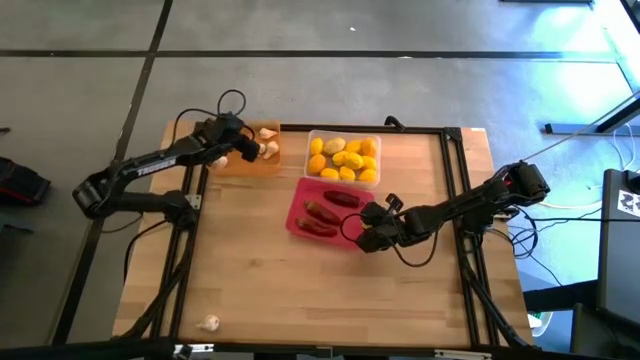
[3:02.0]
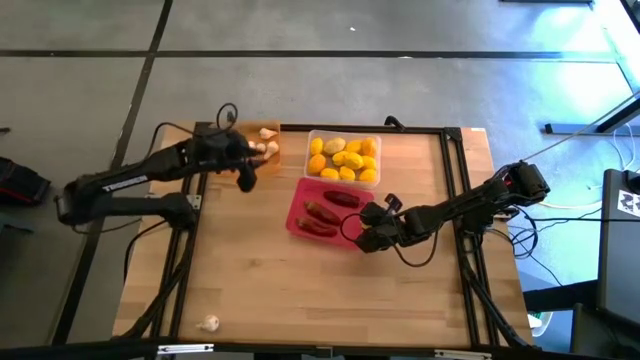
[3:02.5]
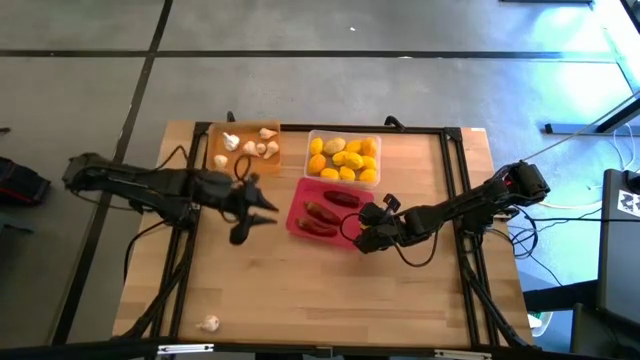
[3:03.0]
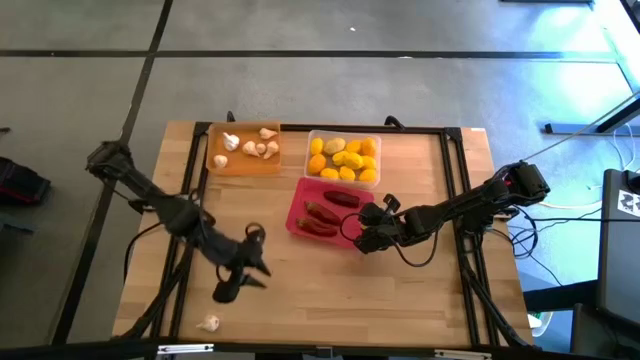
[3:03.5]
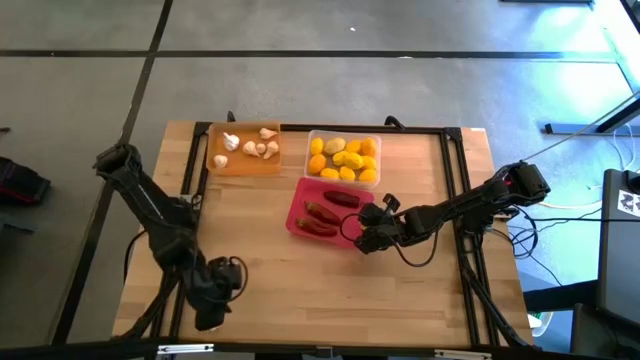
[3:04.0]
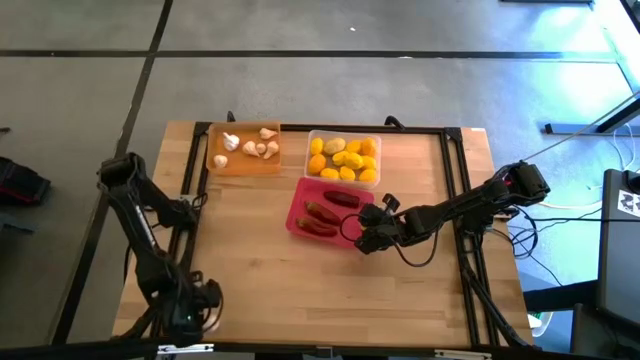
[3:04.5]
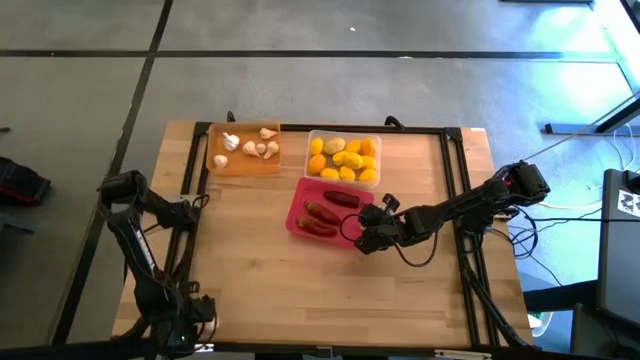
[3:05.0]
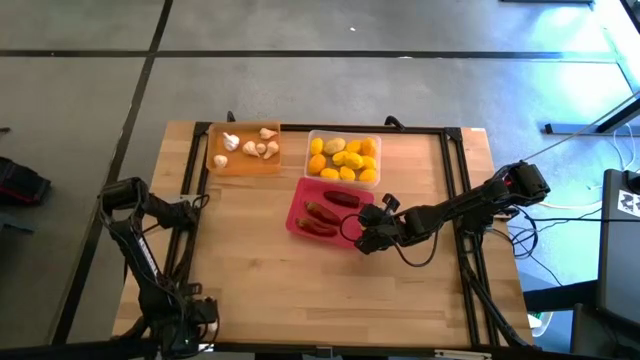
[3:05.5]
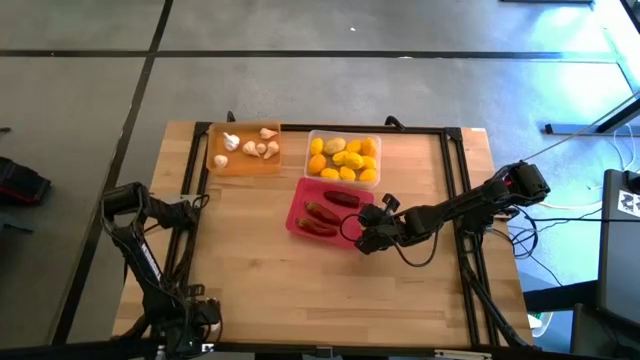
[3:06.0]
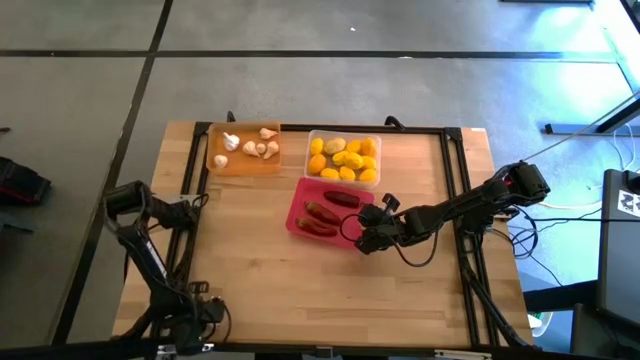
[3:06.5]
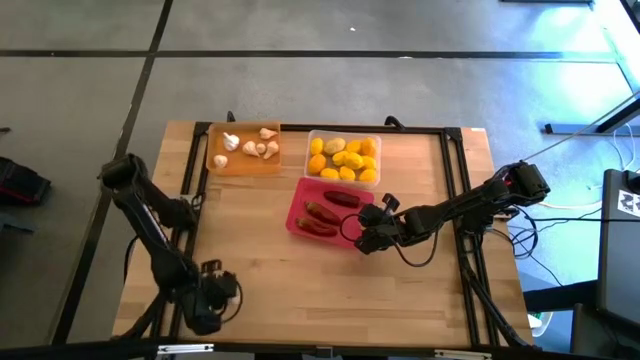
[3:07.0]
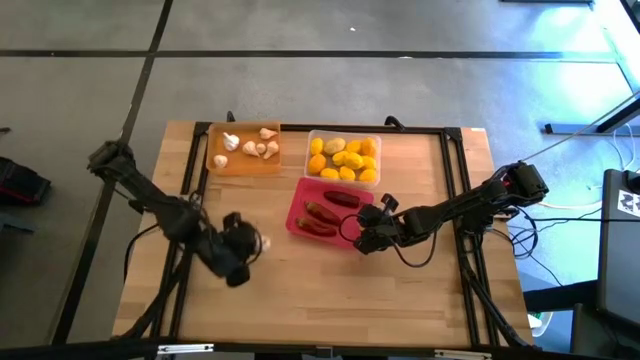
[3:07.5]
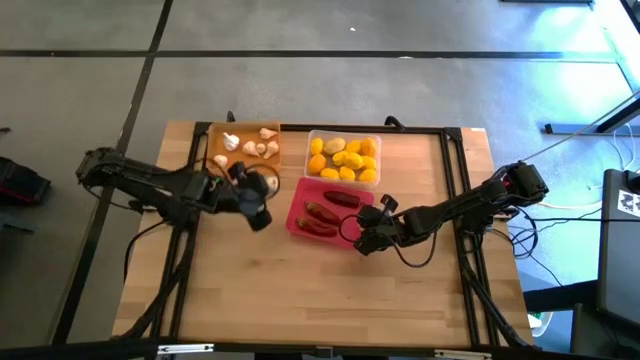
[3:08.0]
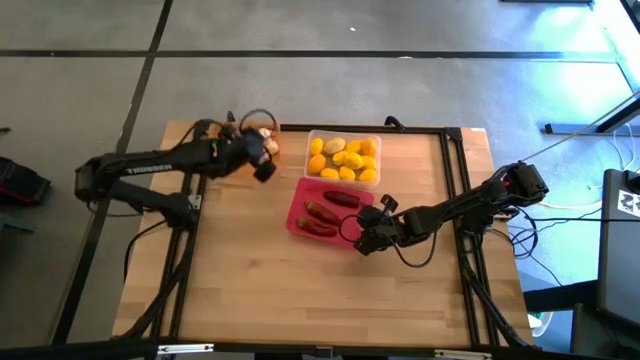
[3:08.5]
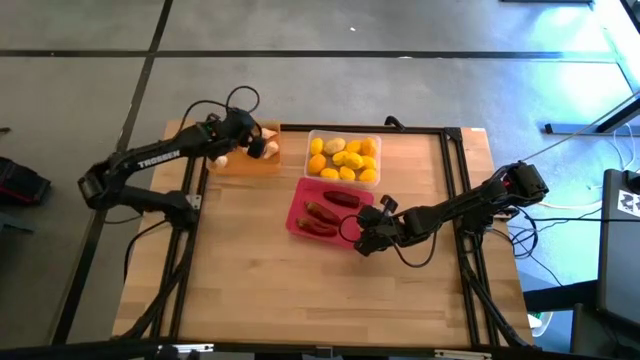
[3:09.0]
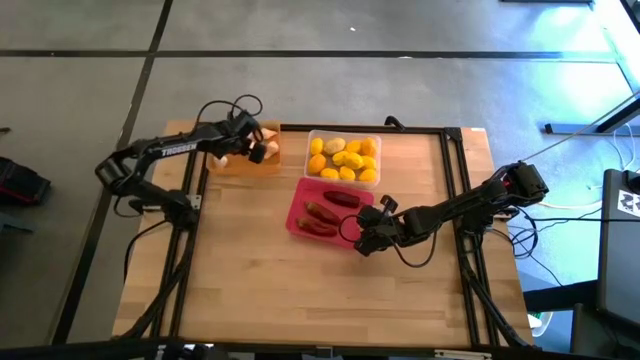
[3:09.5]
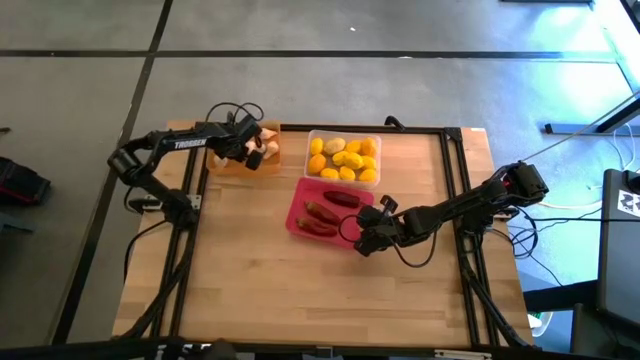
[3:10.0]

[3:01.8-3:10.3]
Task: Sort produce into baskets
Put the white garlic in the orange bin

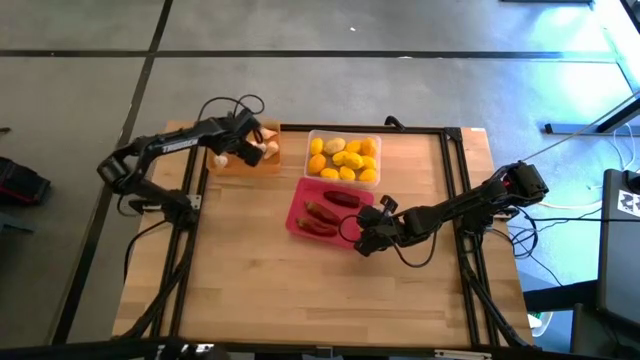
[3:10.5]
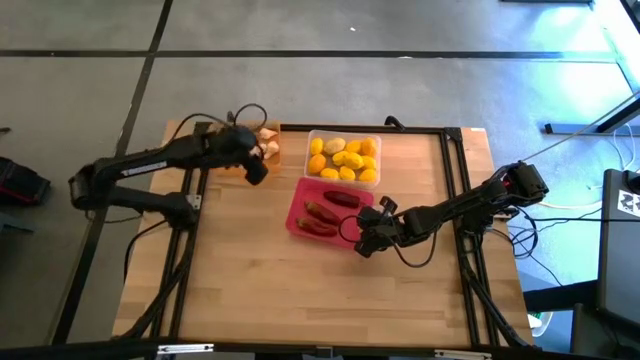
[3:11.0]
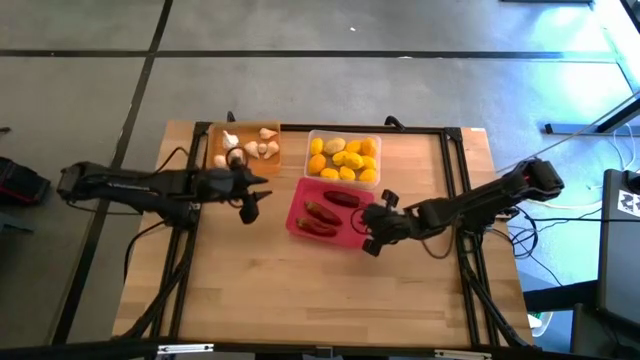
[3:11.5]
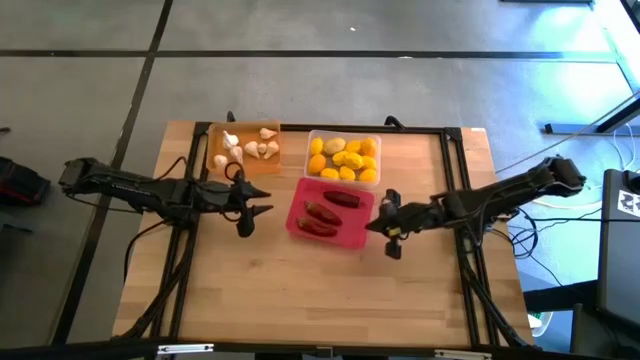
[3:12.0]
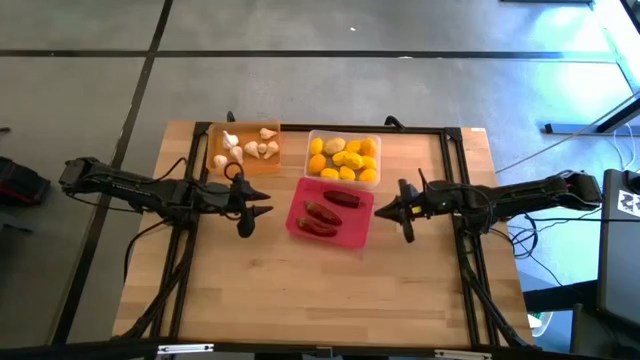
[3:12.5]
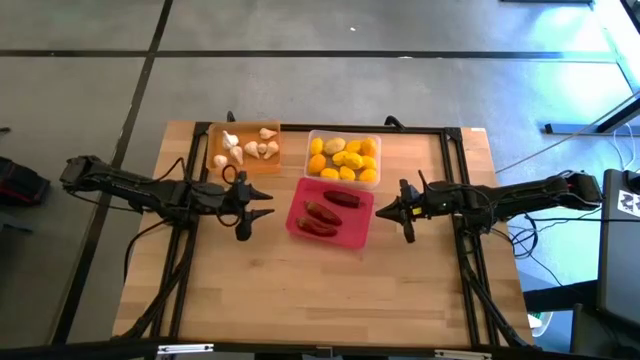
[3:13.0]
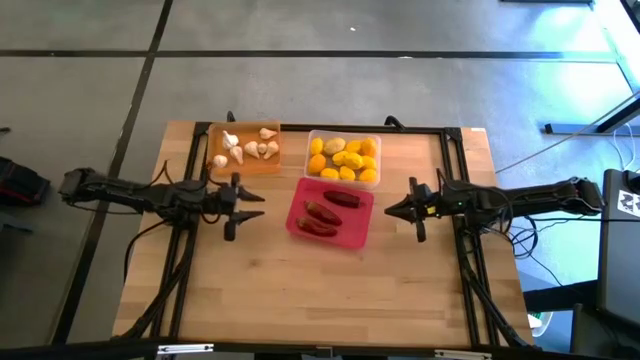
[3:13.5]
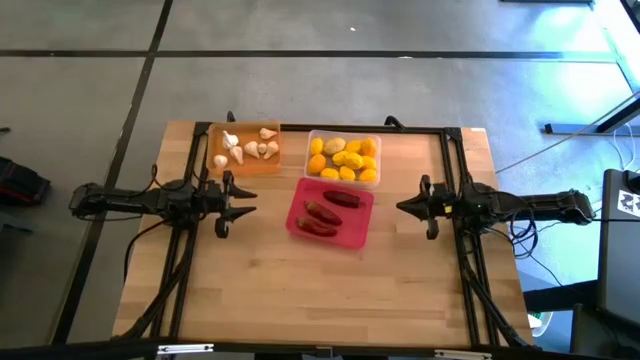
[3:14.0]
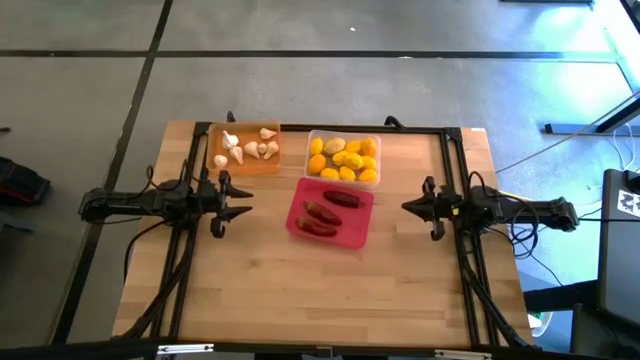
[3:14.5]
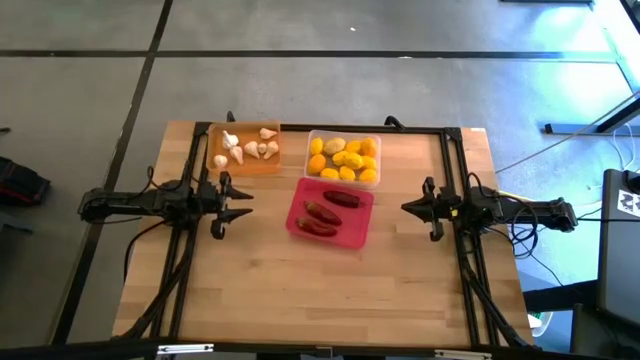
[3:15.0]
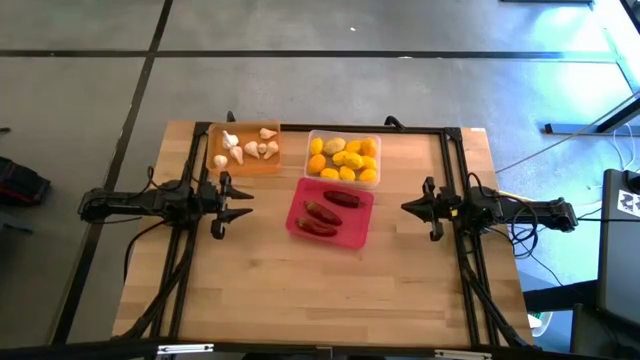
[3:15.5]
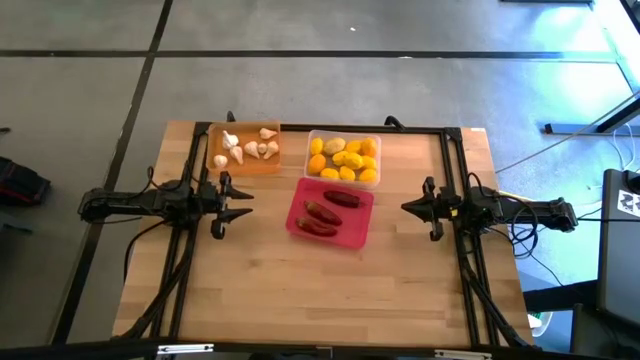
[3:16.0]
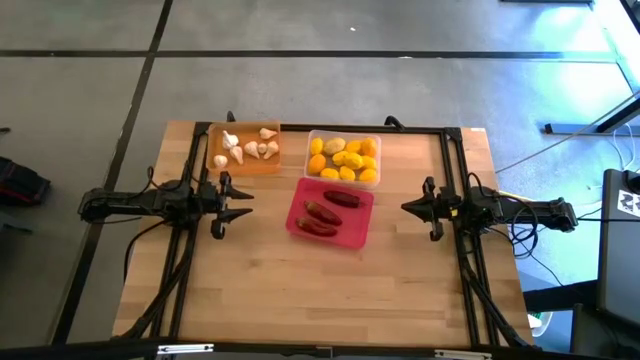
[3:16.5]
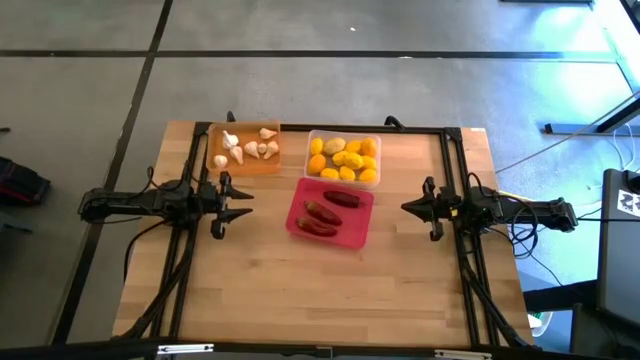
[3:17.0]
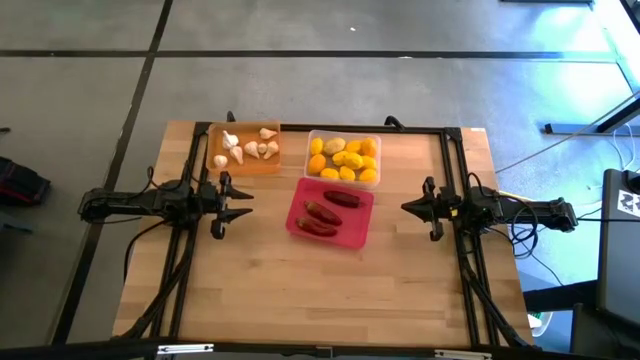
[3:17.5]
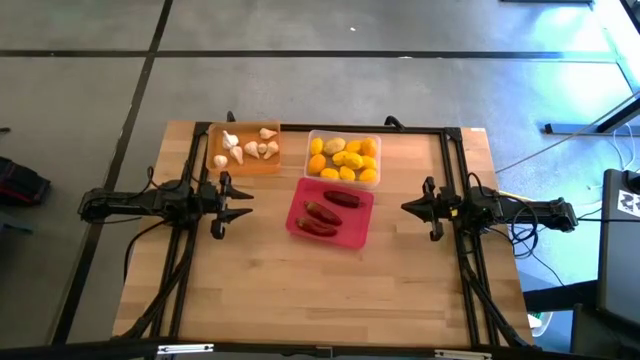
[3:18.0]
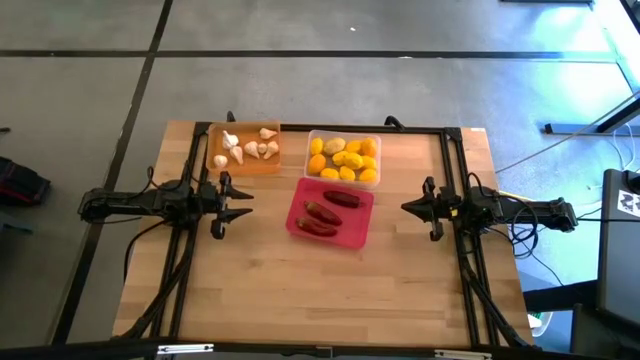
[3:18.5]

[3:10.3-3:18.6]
Return to Home Position
